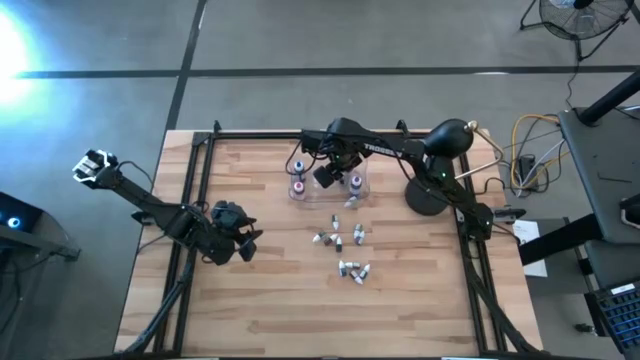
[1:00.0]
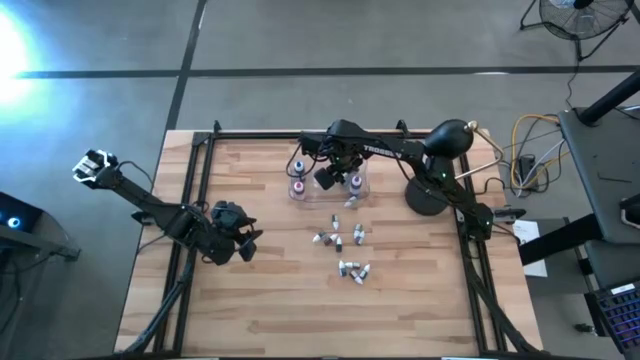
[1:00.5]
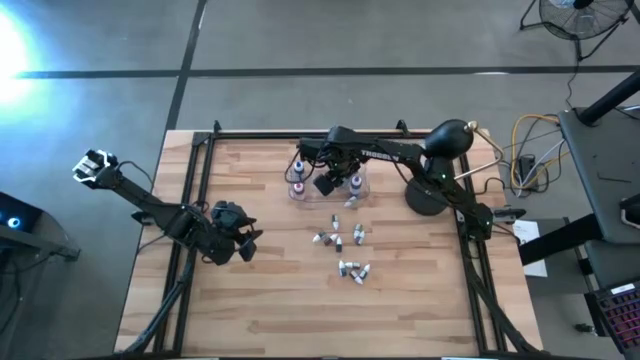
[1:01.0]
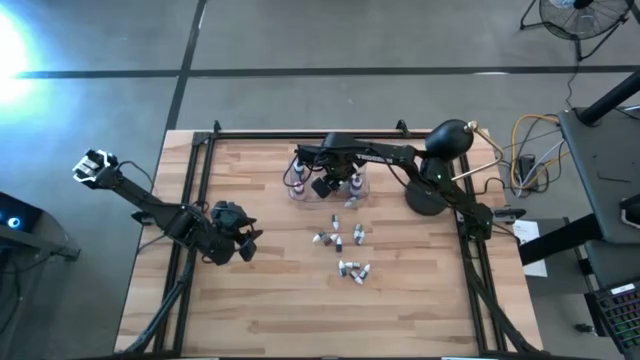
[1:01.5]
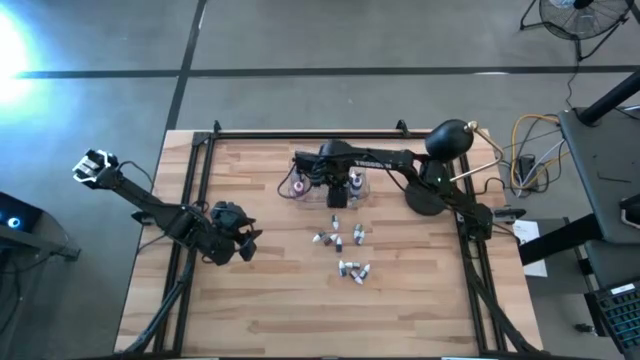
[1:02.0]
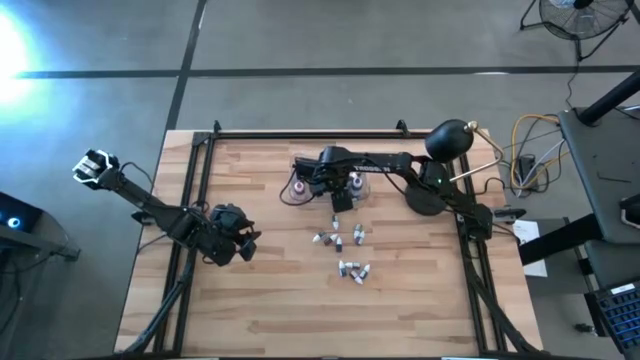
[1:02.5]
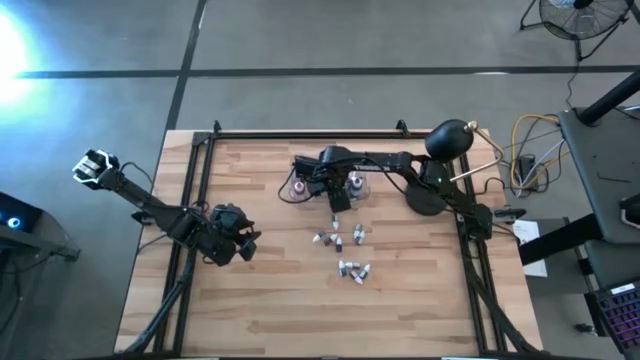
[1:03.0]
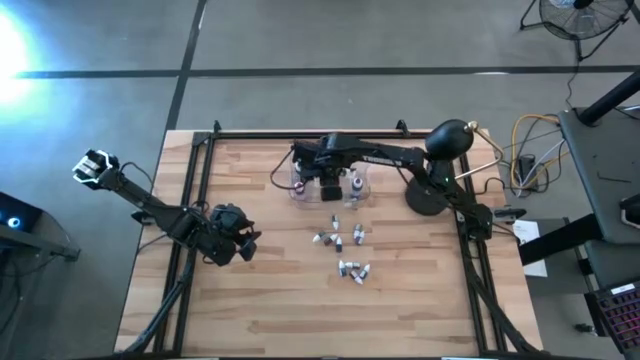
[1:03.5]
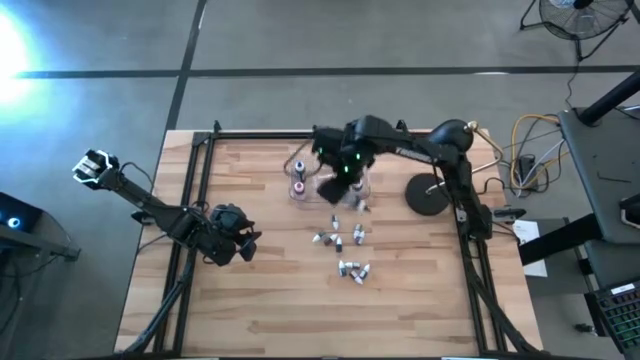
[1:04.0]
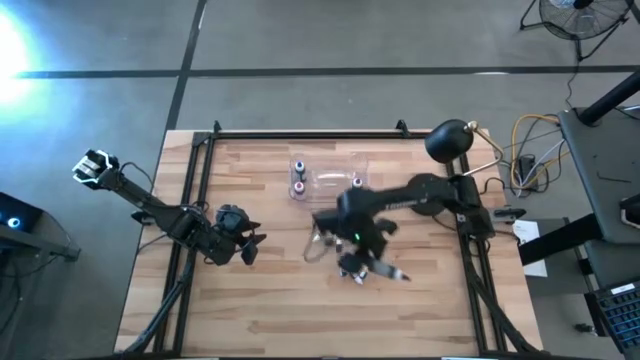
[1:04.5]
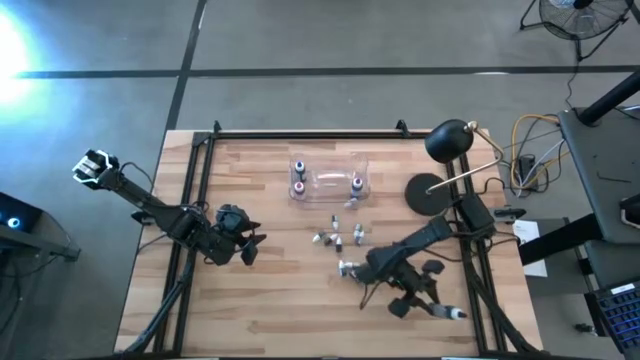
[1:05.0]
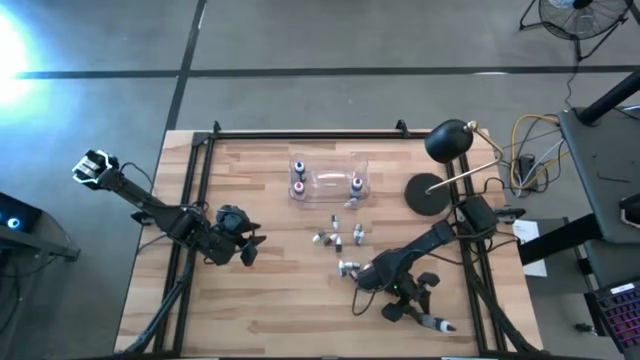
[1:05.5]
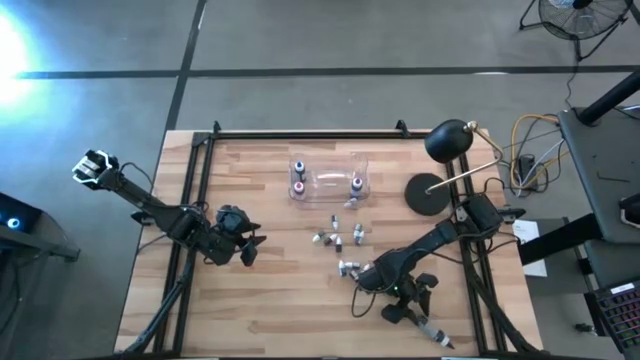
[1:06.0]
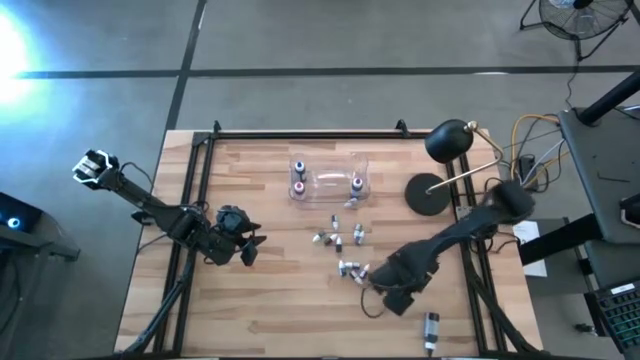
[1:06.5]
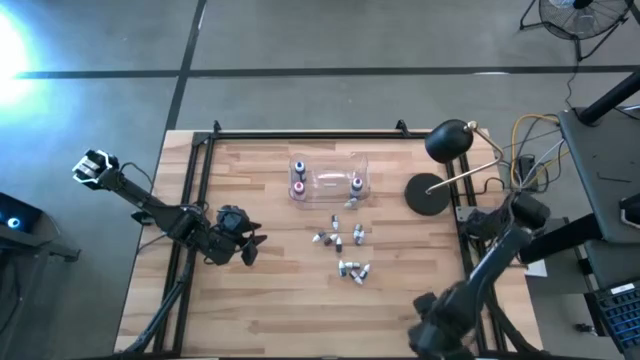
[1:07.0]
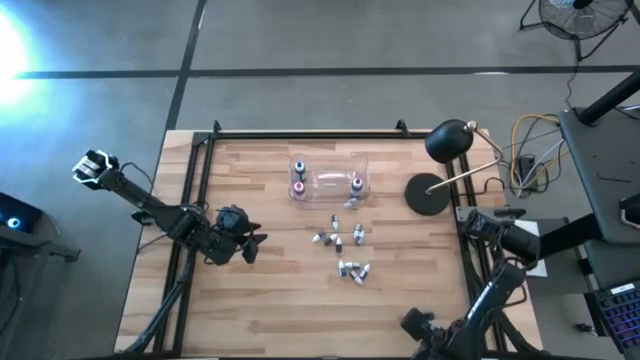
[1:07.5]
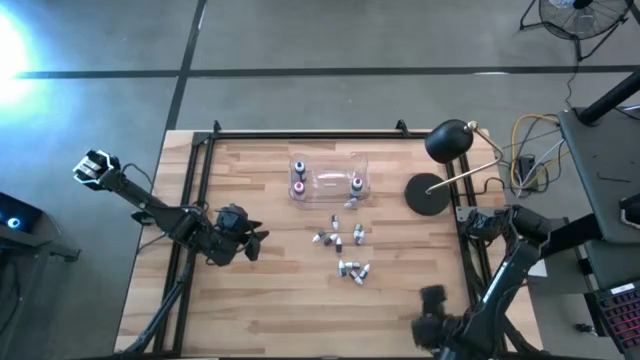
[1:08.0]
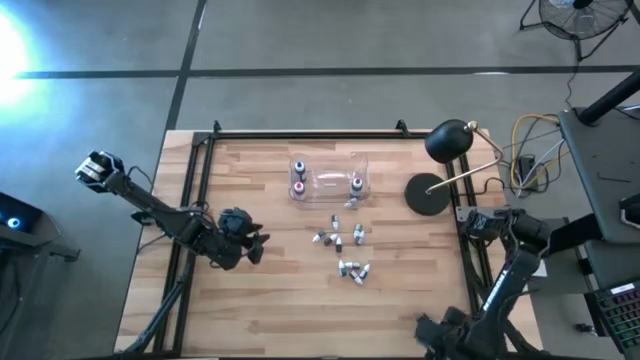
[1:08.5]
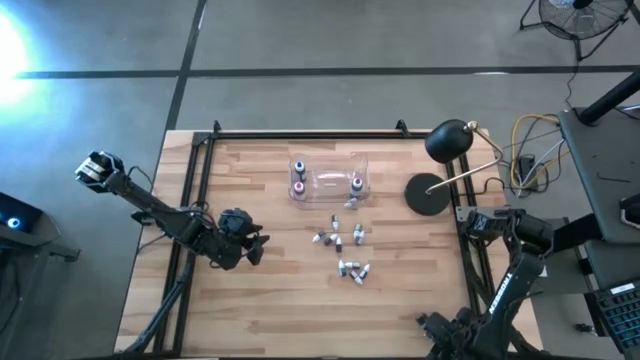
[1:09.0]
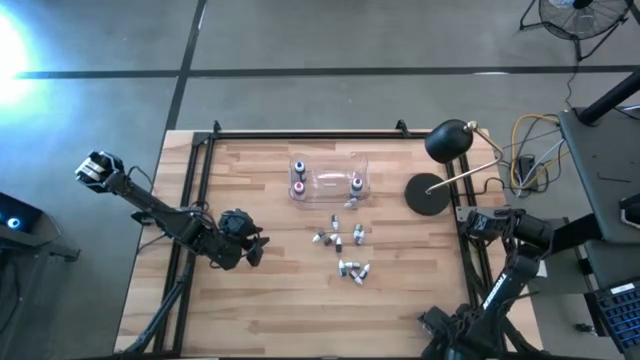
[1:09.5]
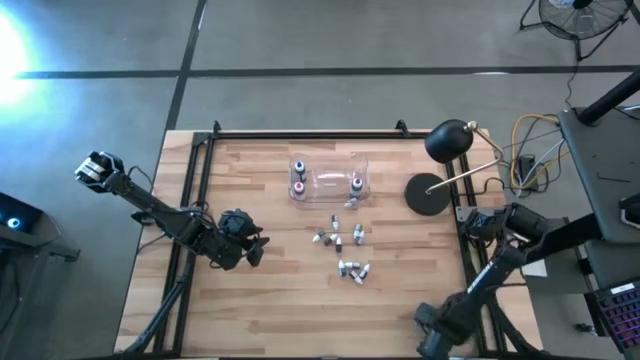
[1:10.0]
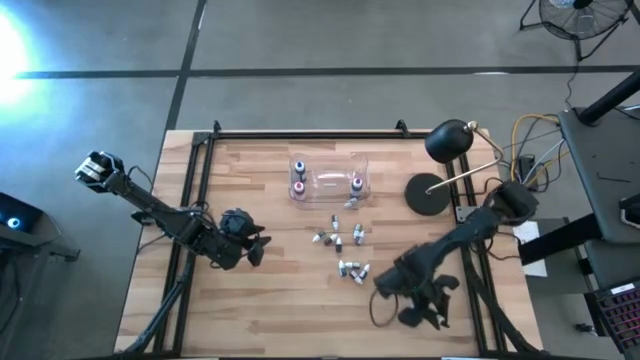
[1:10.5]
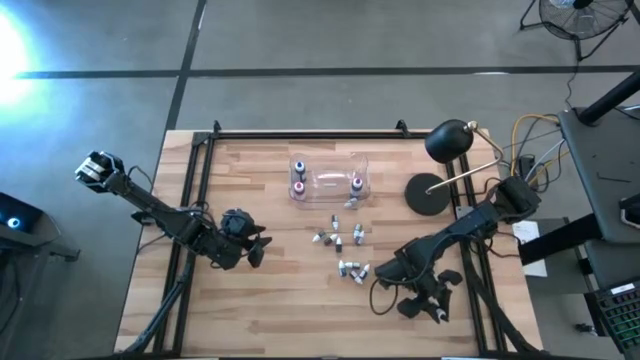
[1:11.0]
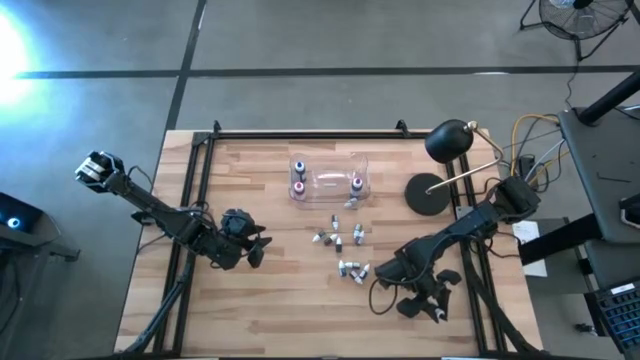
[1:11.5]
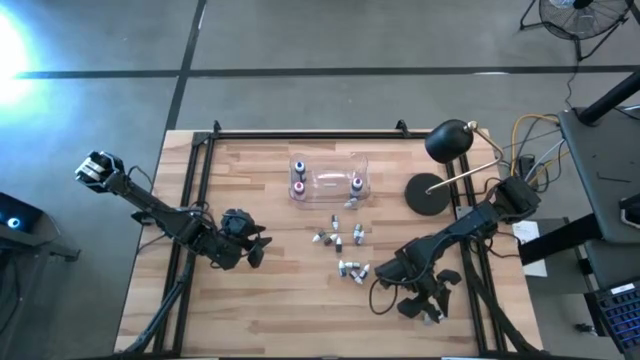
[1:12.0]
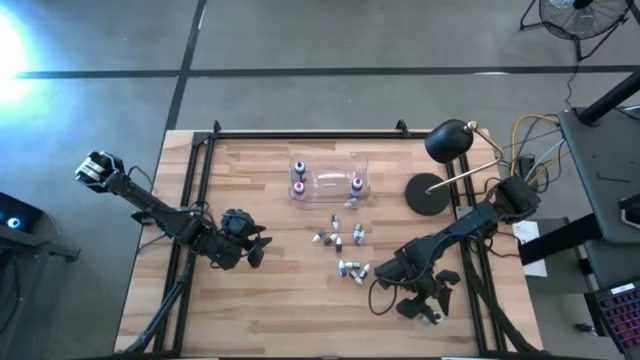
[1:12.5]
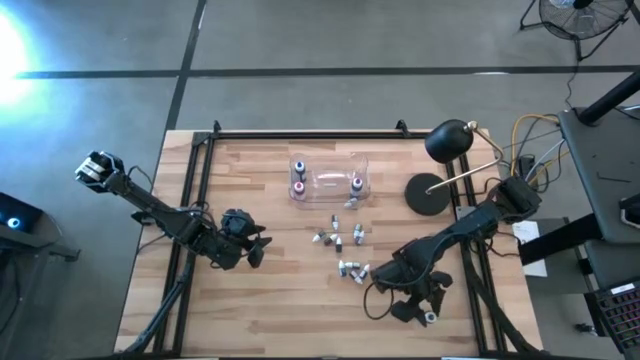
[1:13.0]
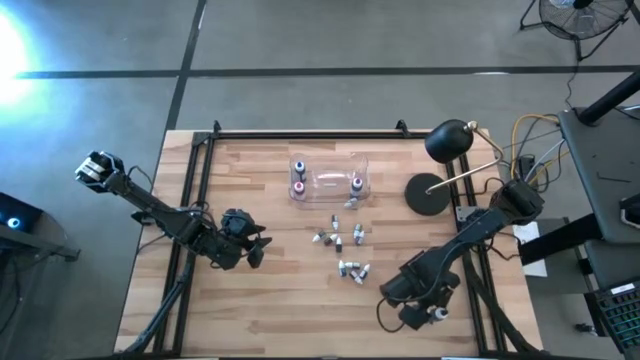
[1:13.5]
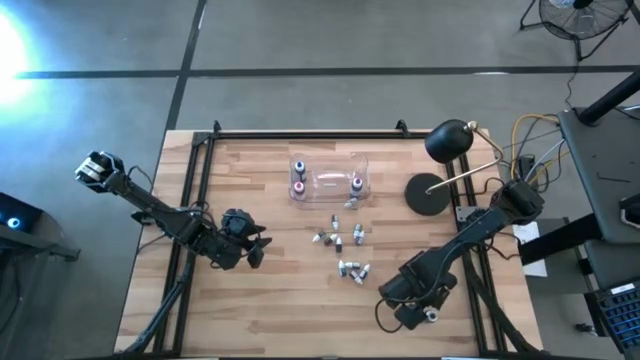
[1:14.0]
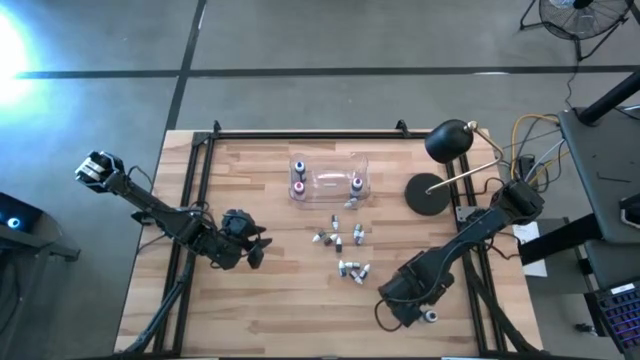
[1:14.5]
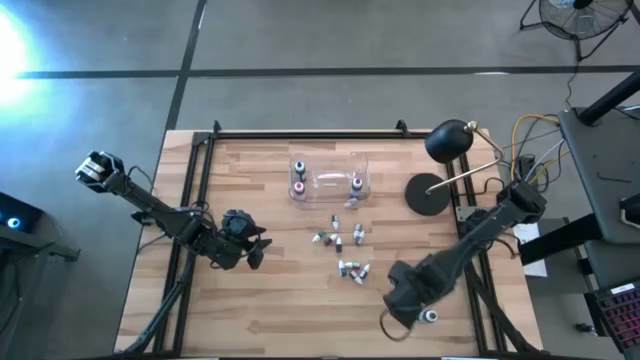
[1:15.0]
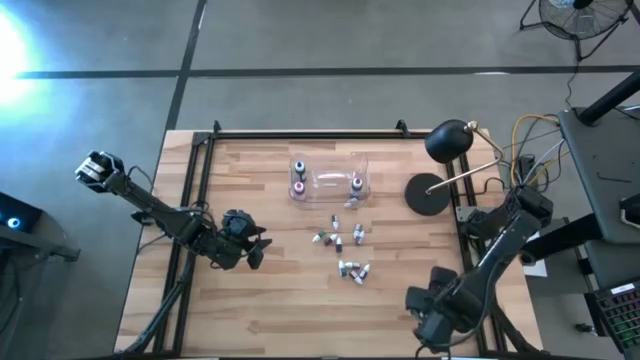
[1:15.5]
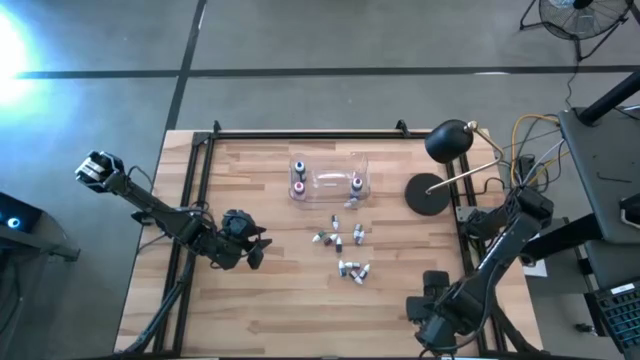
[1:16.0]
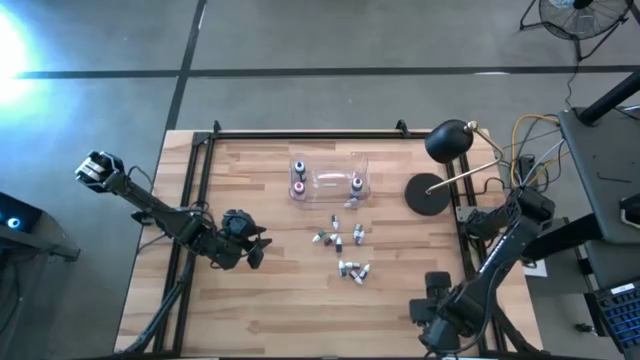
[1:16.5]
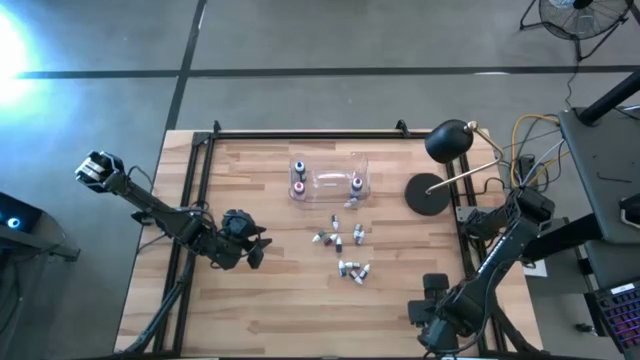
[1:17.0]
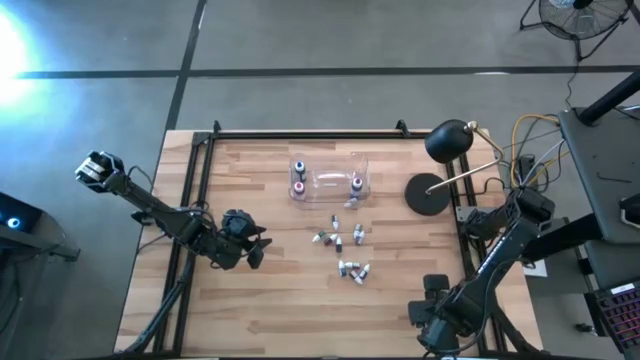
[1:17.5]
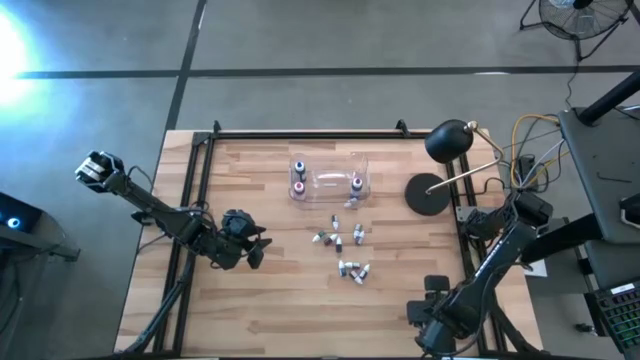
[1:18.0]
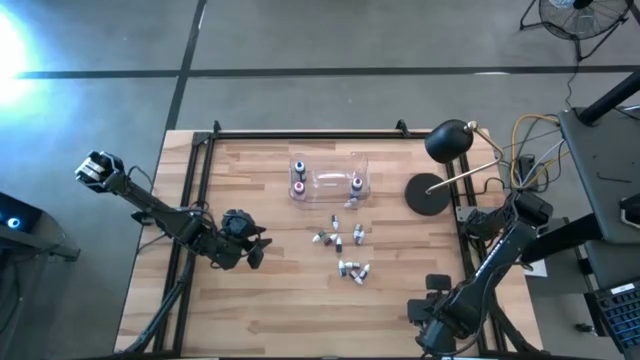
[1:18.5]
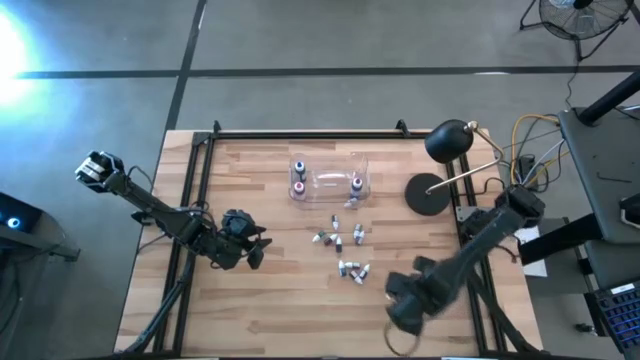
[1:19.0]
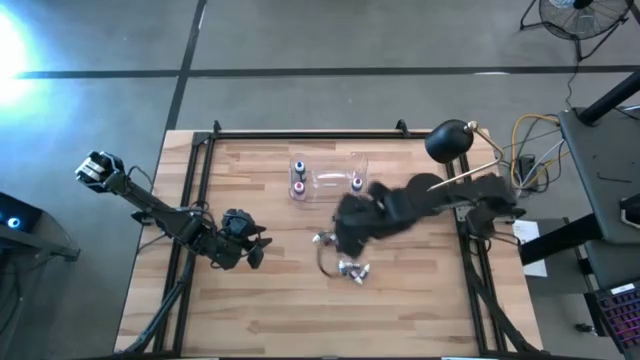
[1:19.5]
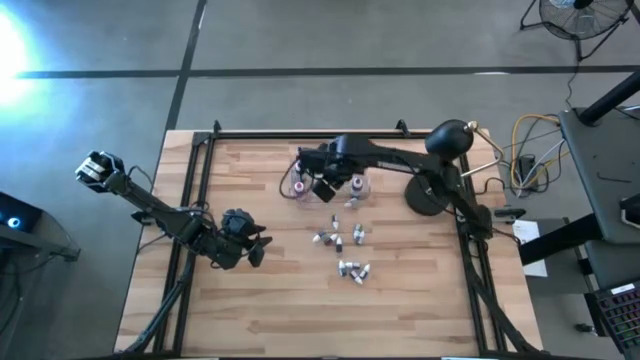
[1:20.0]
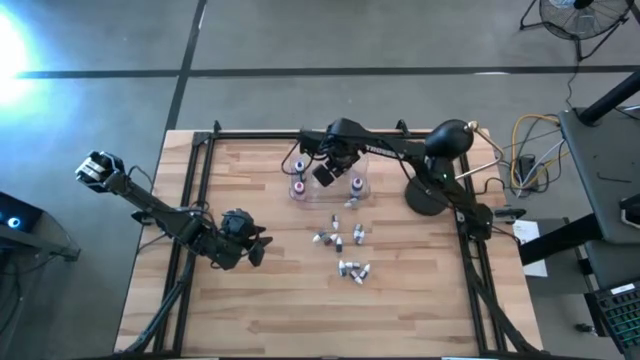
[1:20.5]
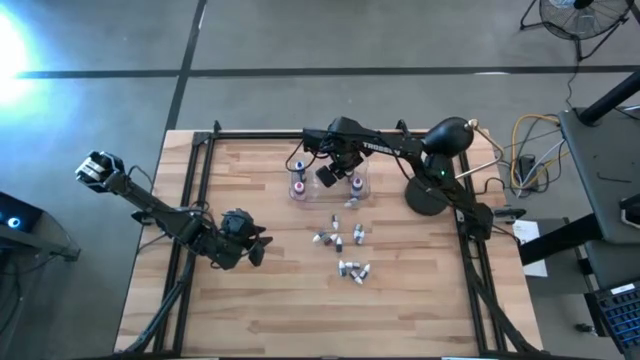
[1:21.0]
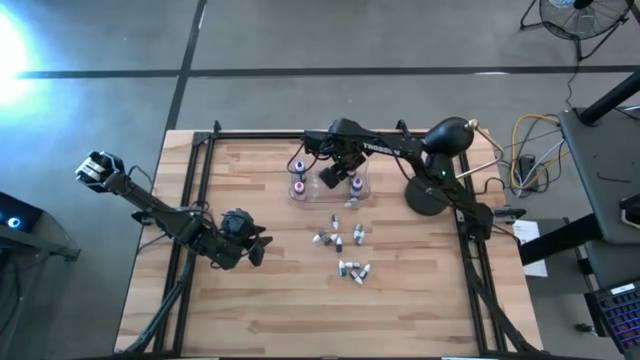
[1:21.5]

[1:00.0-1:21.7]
Task: Pick & Place food coloring
Put the large black food coloring bottle into the transparent bin
